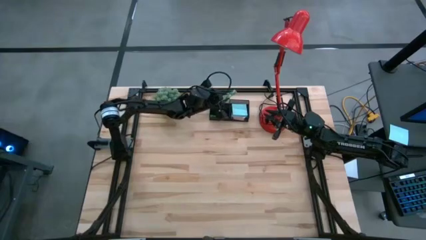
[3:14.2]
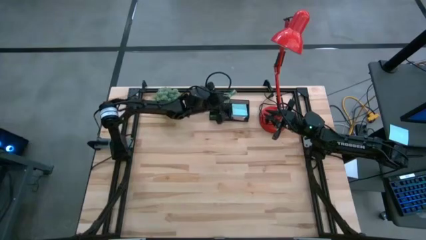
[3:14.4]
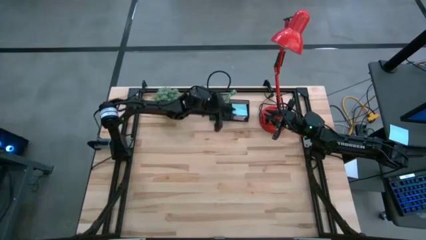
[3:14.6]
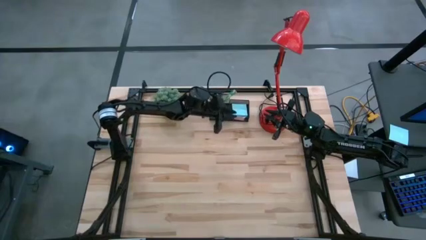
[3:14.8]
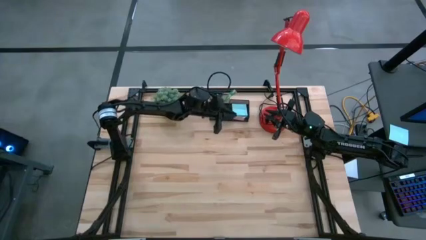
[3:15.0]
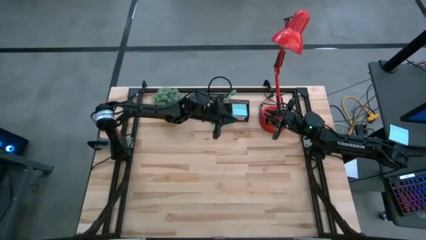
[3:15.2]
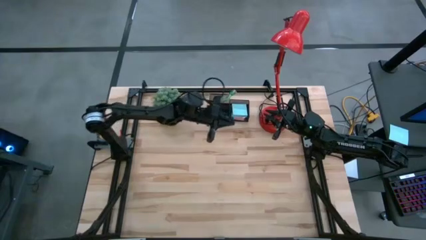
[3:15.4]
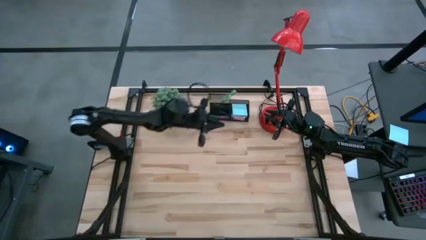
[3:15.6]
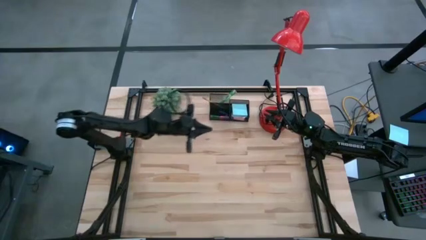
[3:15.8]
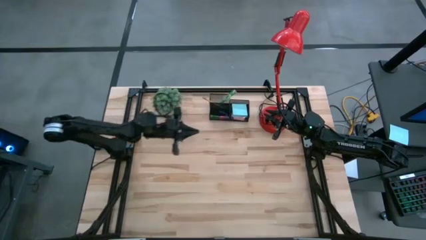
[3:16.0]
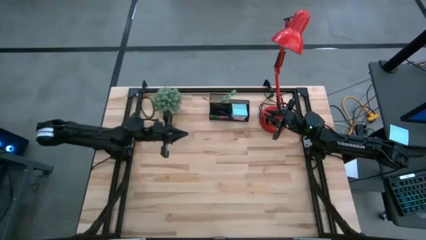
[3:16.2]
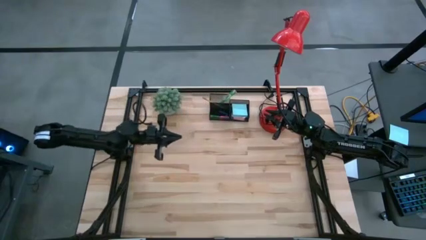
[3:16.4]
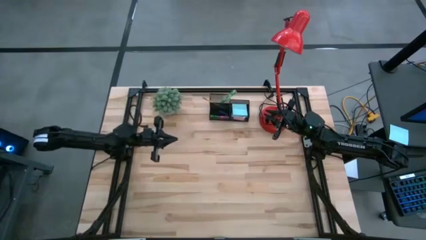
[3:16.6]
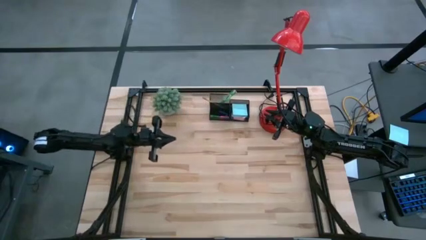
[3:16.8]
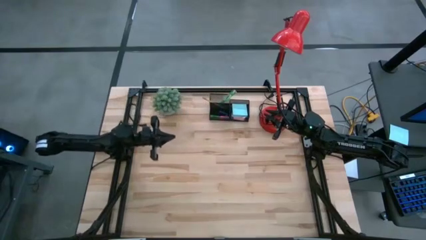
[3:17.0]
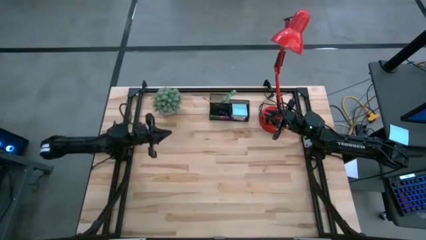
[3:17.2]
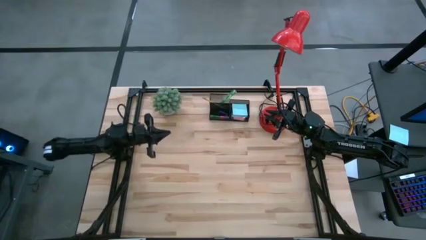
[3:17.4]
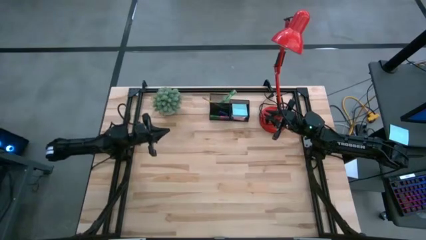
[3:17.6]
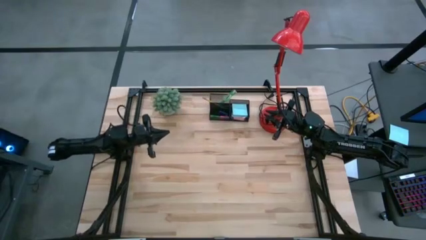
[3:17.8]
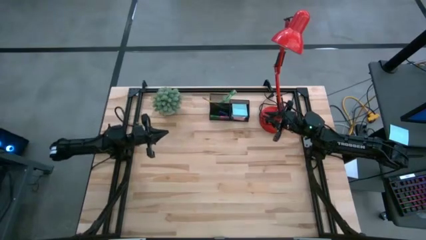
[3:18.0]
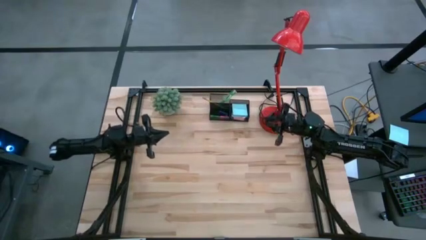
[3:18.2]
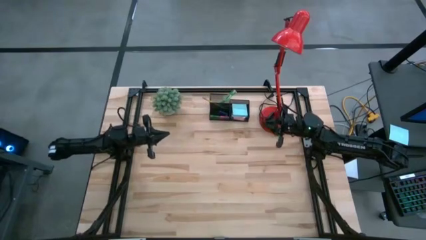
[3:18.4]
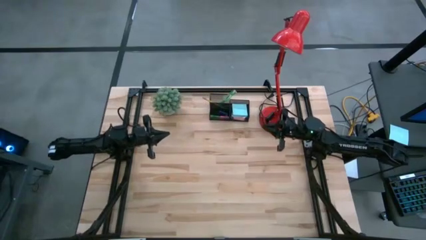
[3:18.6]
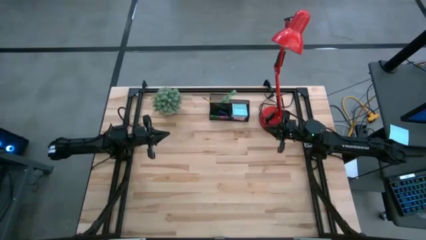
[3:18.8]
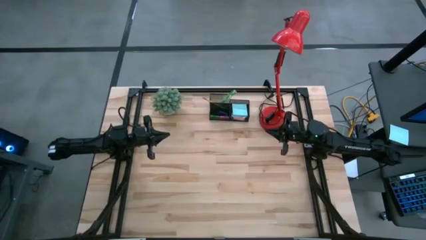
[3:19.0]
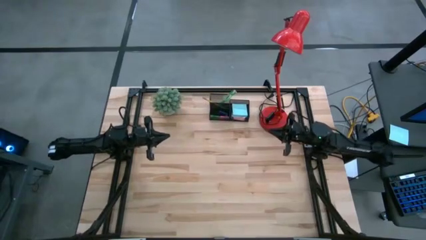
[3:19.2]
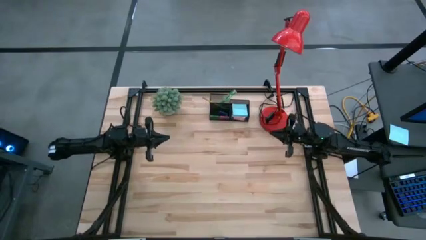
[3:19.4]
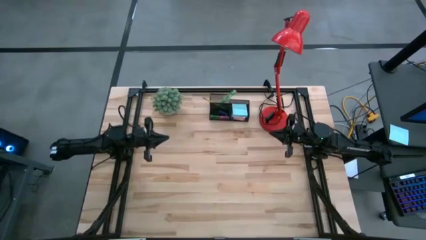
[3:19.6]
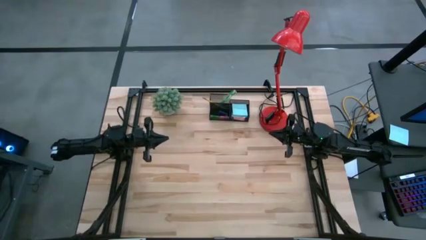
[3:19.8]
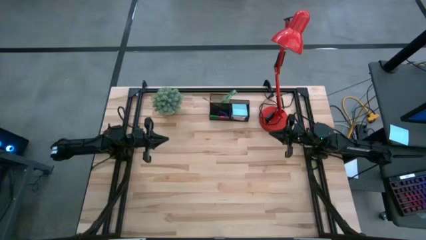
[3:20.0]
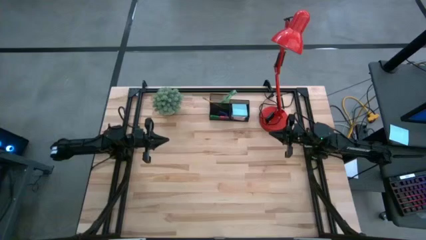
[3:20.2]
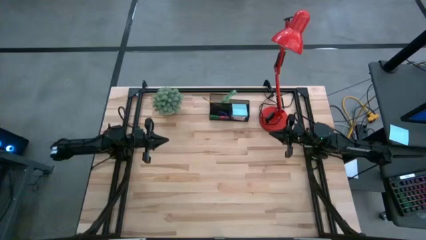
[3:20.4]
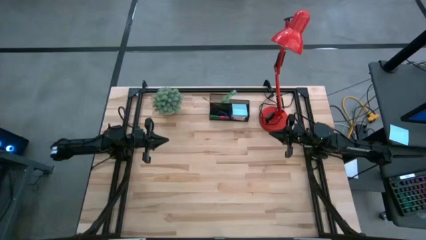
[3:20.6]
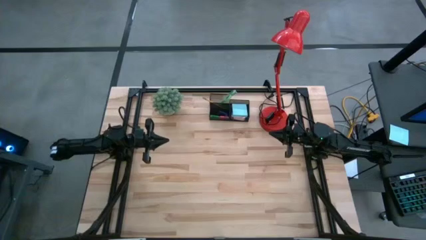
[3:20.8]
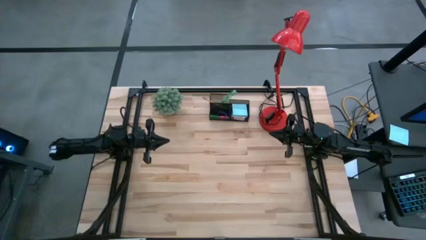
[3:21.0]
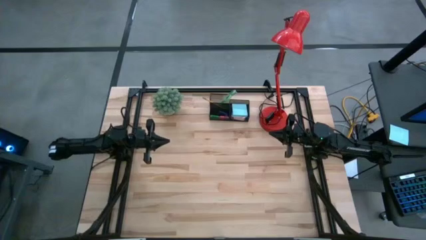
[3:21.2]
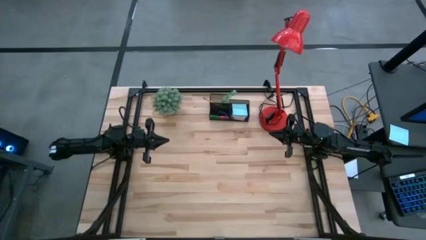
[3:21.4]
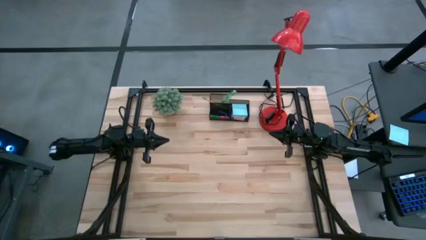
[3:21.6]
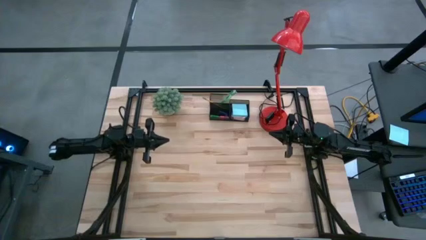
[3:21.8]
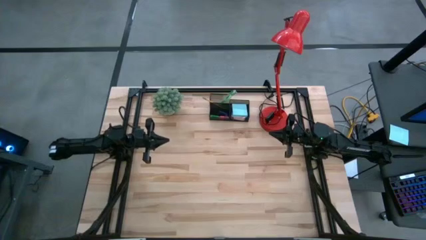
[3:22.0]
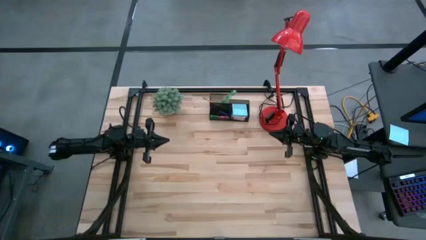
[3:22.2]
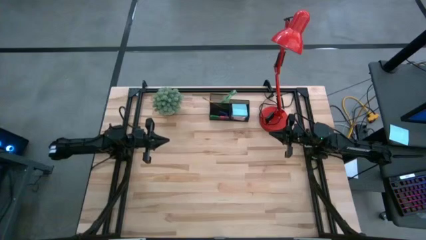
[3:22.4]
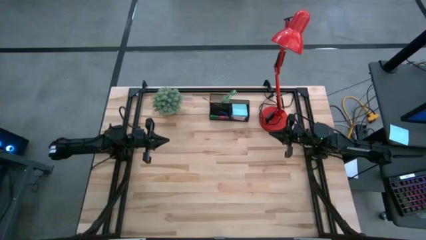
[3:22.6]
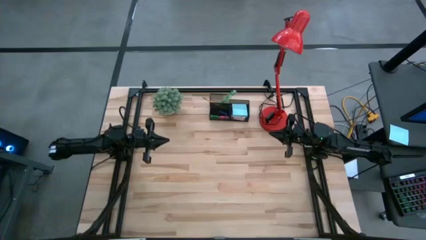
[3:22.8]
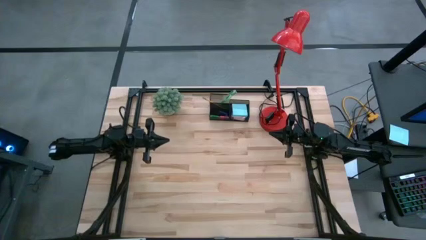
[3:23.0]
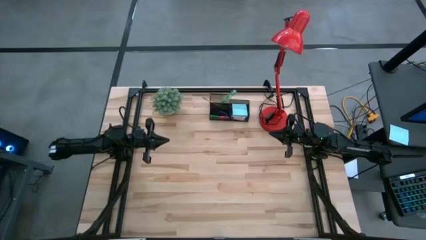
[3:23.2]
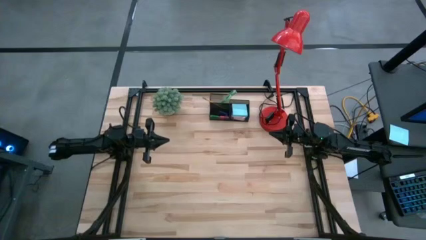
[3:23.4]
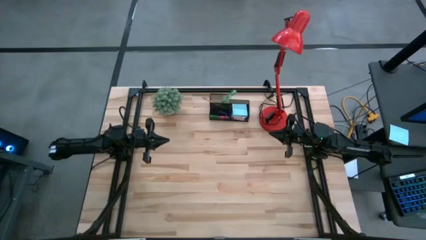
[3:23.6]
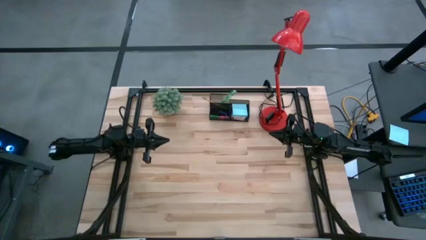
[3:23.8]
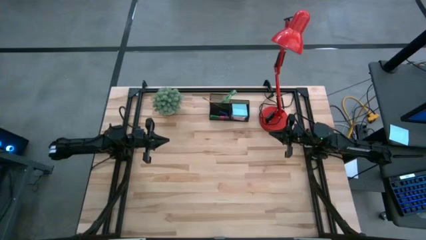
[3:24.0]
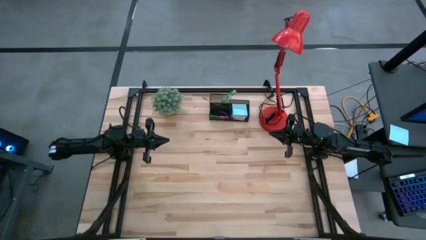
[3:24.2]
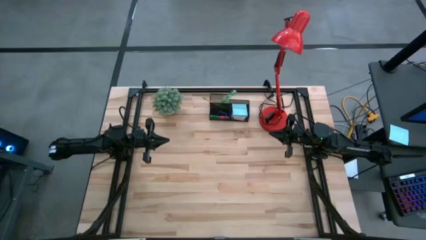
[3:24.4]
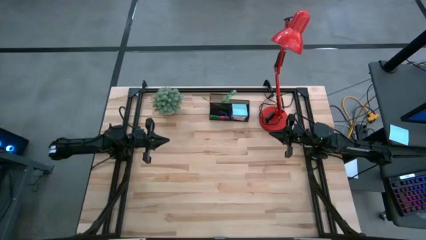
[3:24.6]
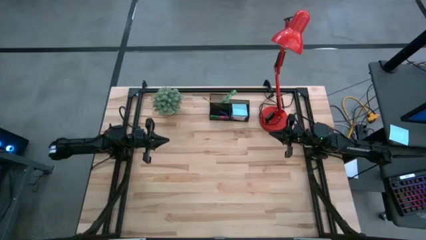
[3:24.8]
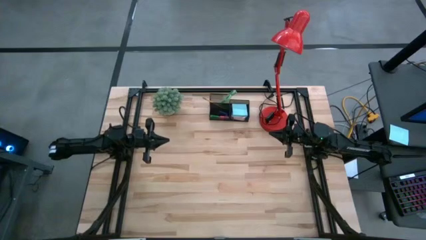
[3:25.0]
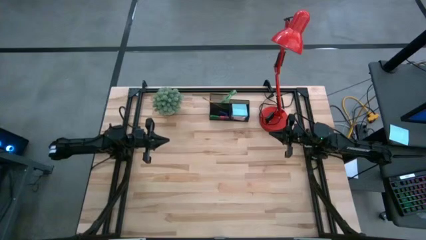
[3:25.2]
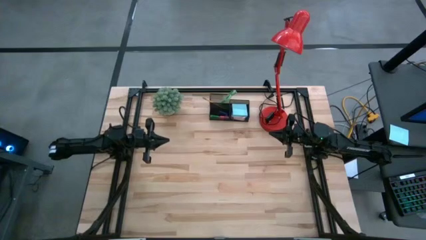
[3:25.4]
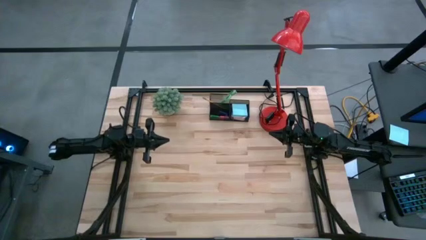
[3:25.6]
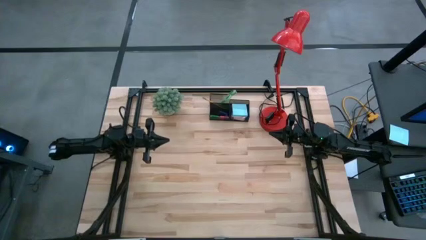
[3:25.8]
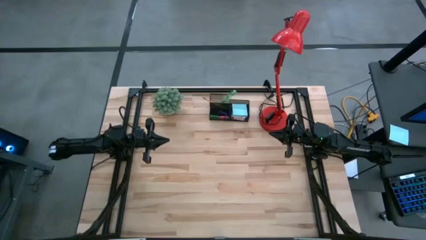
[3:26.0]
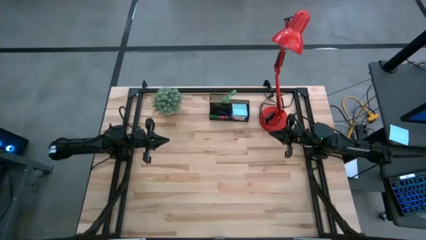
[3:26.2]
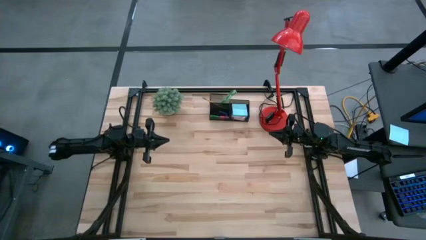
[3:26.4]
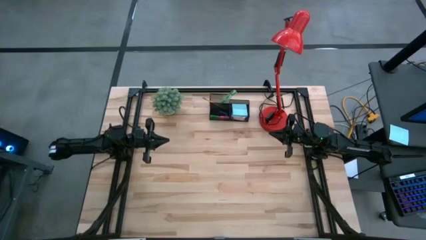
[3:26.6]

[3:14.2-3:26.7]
Task: Pick and place office supplies into organizer
Return to Home Position

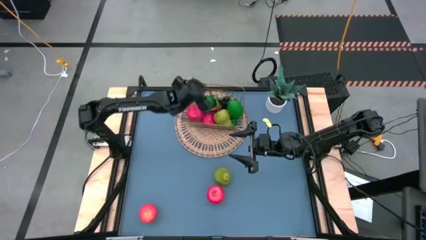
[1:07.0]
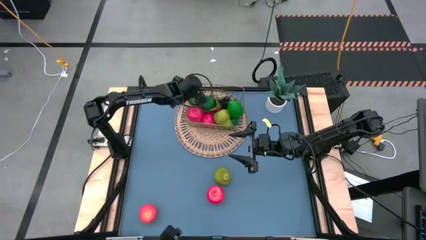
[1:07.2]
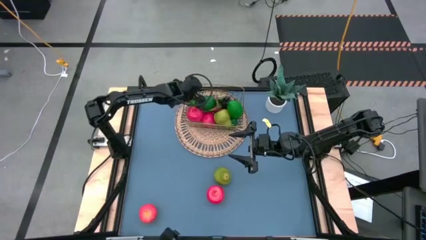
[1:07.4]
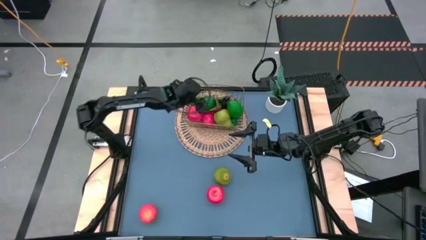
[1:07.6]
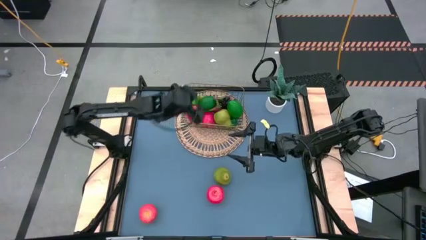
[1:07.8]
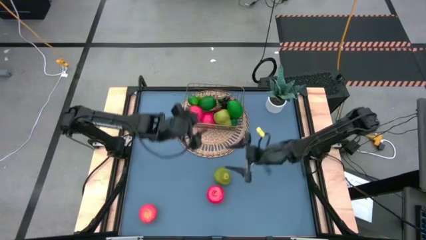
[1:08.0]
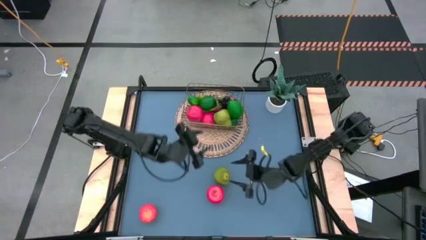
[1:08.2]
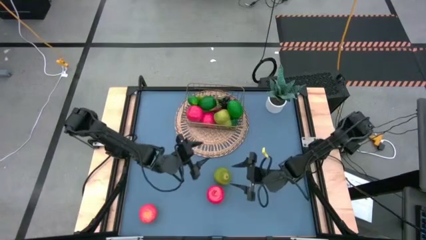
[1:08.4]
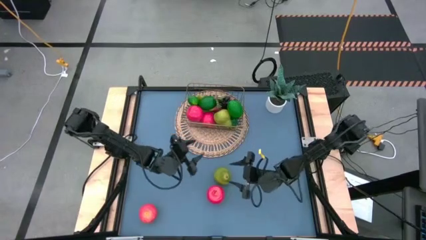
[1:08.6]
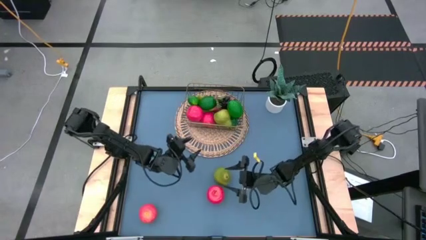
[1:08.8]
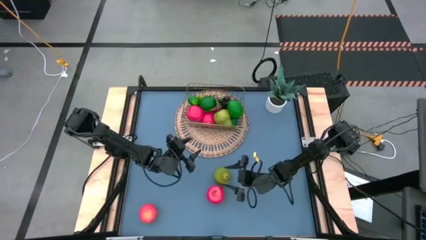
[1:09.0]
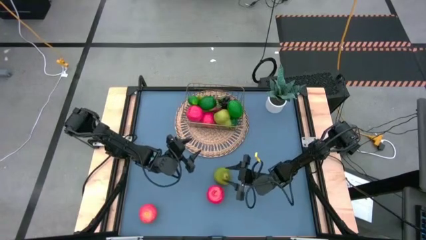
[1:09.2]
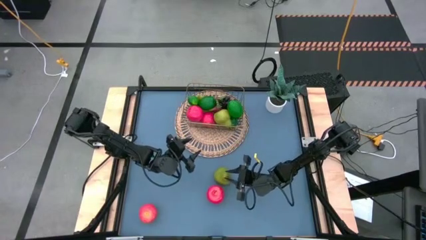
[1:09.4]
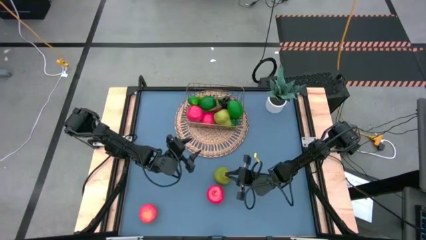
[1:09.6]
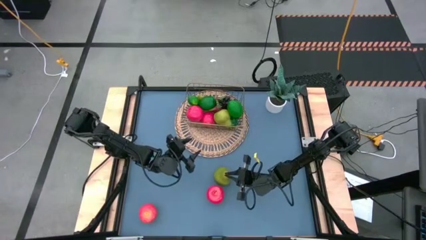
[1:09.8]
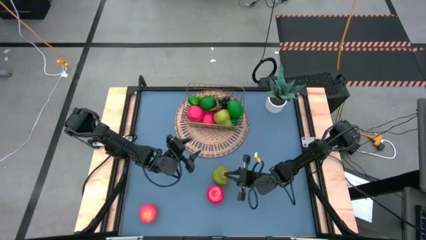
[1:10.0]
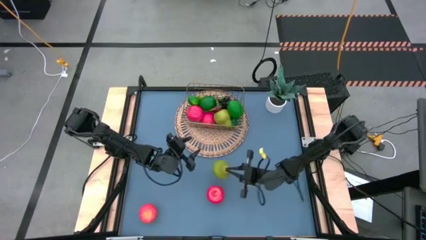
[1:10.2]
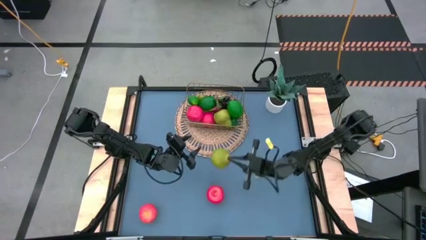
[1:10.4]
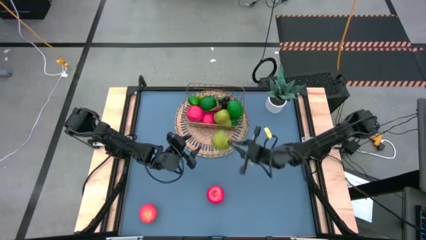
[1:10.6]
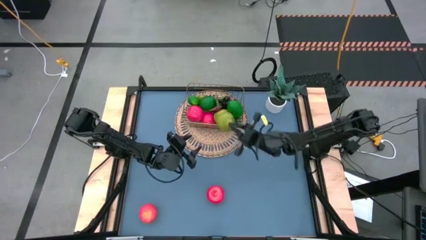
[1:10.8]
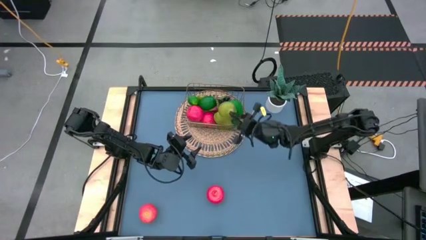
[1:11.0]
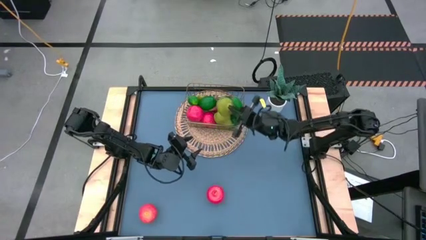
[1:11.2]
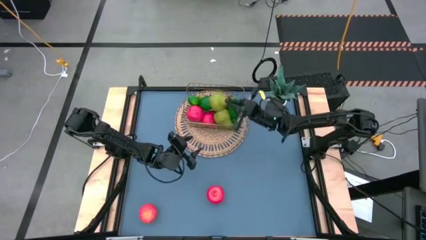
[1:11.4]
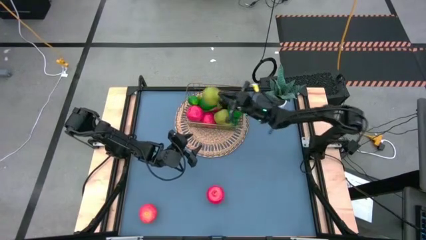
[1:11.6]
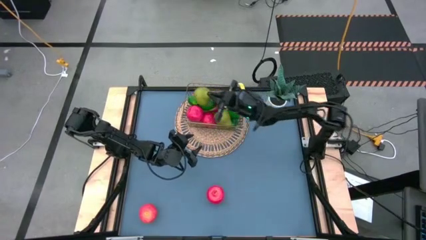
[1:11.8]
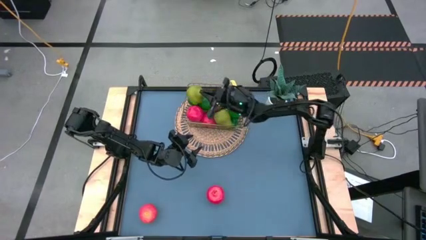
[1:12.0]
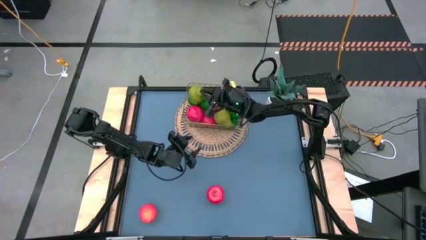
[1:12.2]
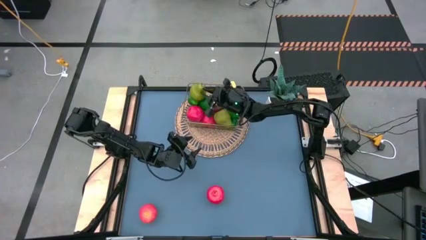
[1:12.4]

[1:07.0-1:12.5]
Task: Build produce basket
Put the green pear into the gold wire basket
